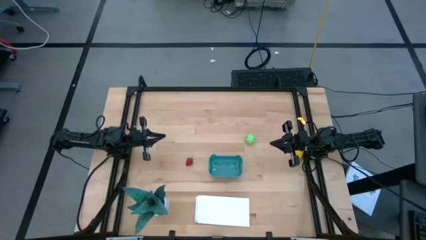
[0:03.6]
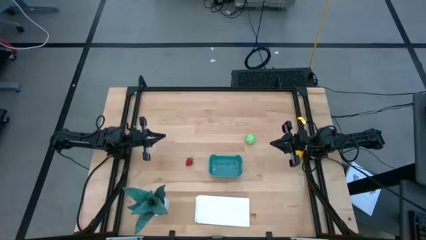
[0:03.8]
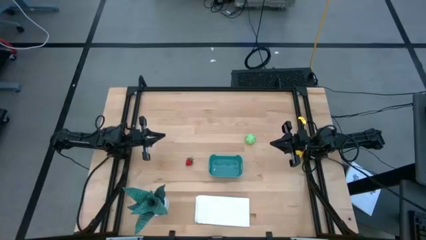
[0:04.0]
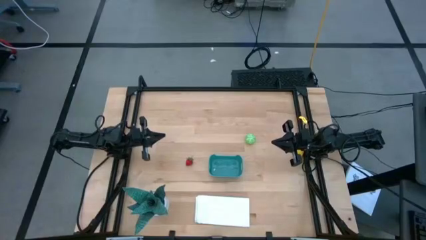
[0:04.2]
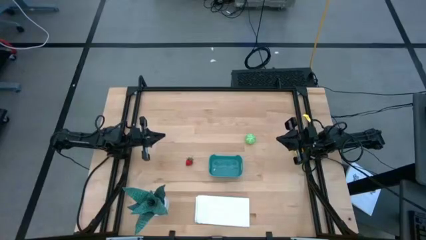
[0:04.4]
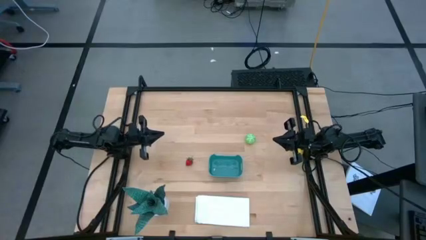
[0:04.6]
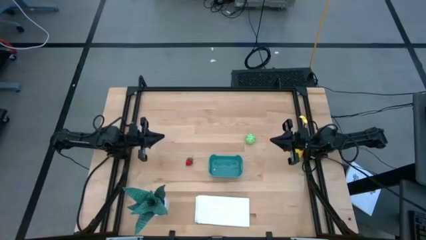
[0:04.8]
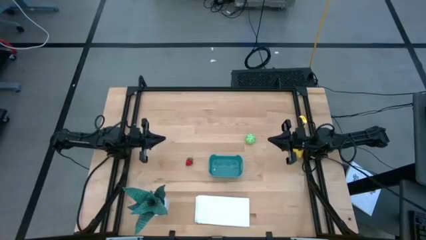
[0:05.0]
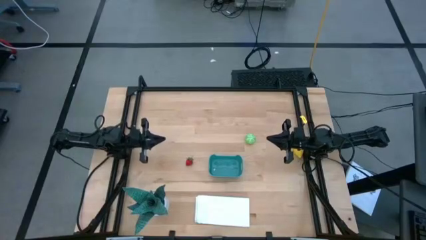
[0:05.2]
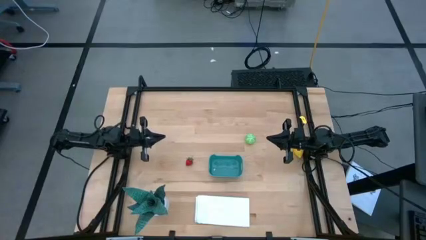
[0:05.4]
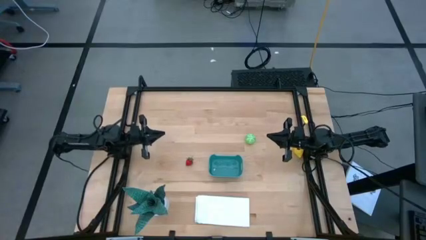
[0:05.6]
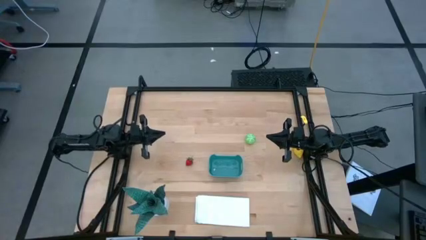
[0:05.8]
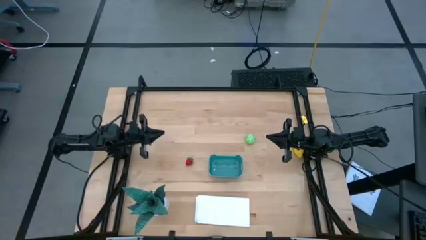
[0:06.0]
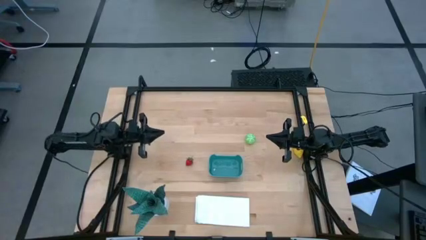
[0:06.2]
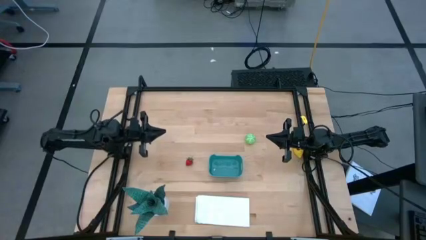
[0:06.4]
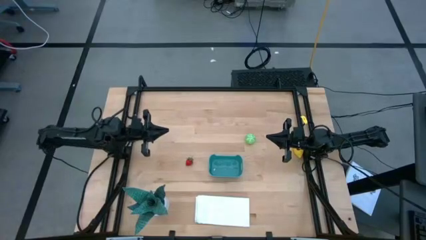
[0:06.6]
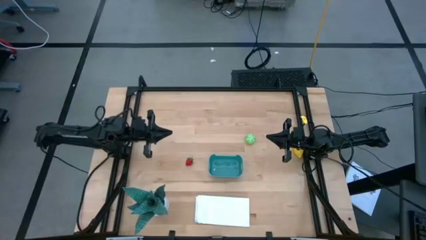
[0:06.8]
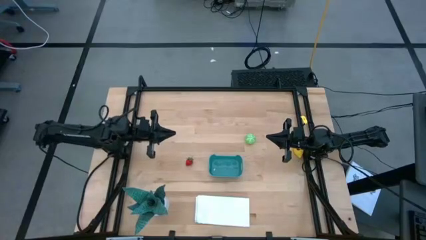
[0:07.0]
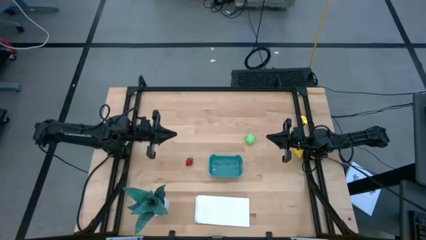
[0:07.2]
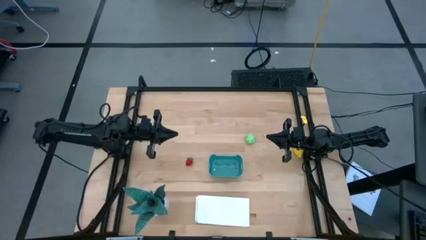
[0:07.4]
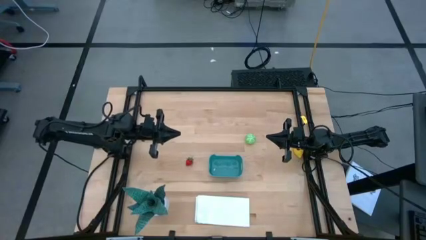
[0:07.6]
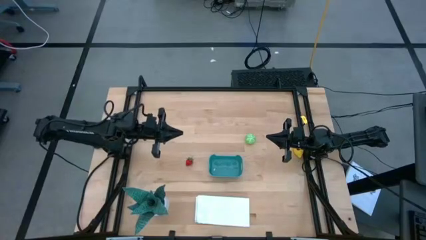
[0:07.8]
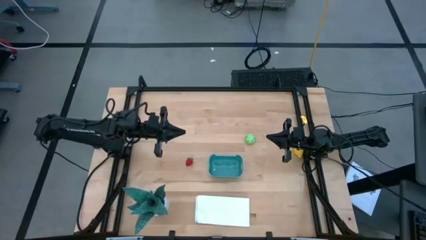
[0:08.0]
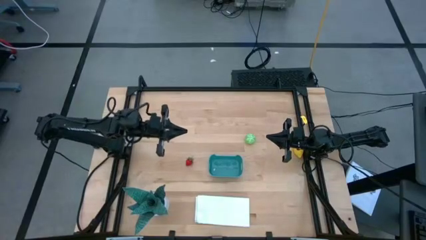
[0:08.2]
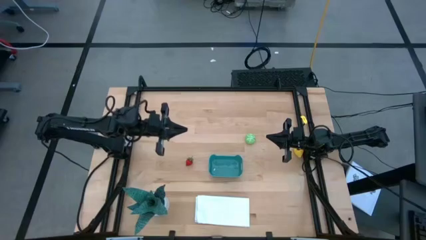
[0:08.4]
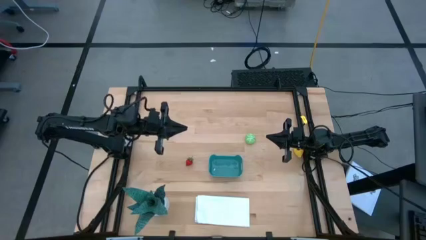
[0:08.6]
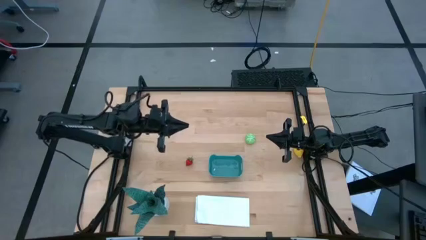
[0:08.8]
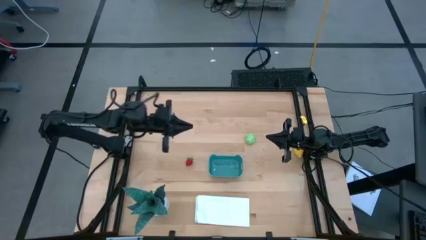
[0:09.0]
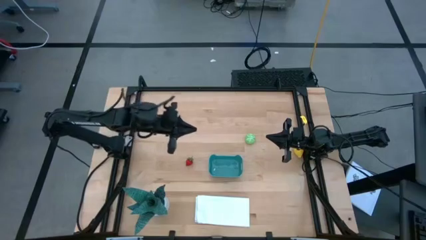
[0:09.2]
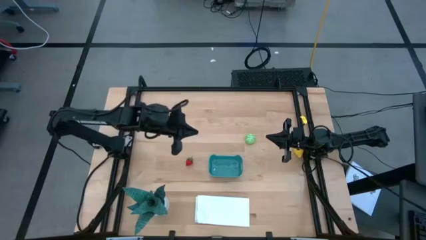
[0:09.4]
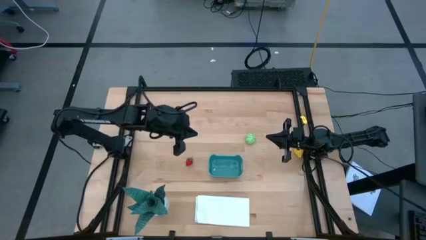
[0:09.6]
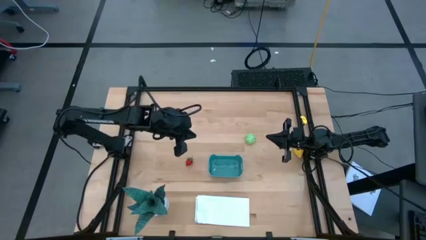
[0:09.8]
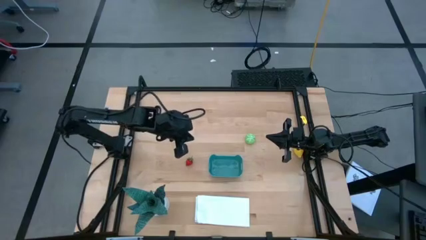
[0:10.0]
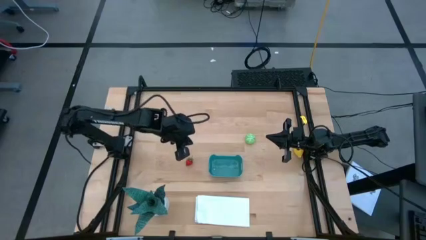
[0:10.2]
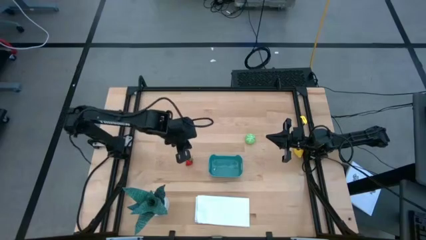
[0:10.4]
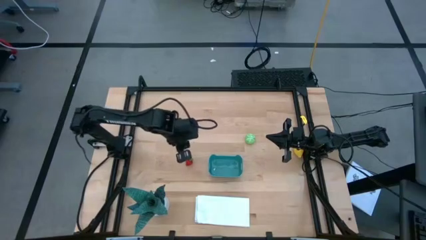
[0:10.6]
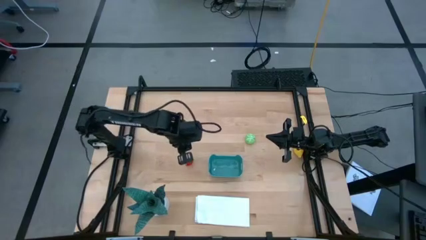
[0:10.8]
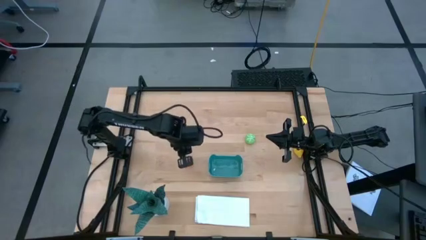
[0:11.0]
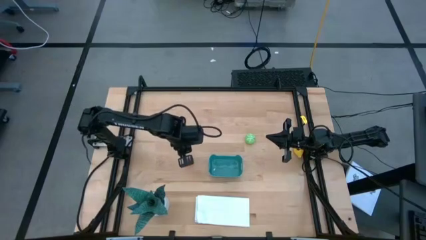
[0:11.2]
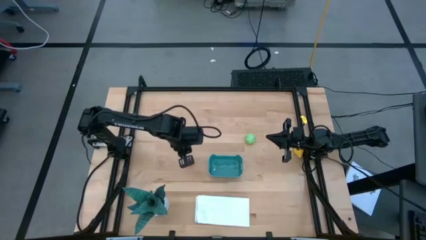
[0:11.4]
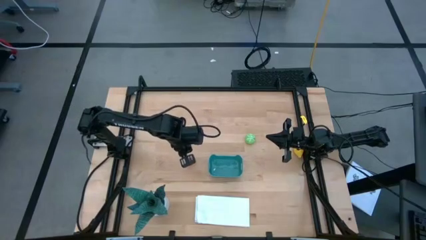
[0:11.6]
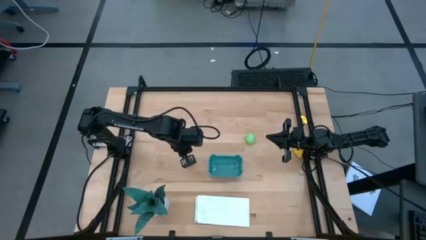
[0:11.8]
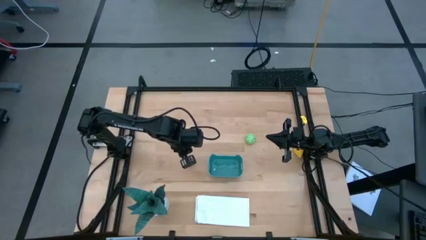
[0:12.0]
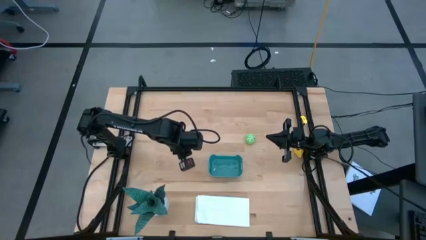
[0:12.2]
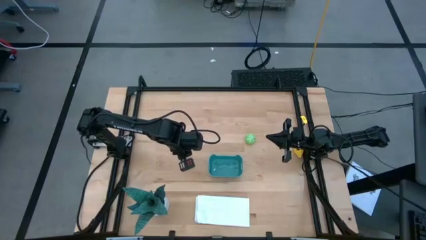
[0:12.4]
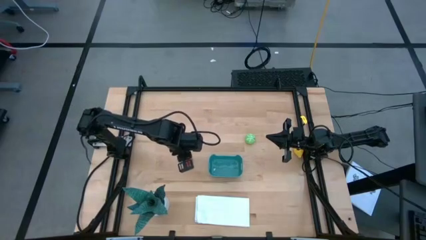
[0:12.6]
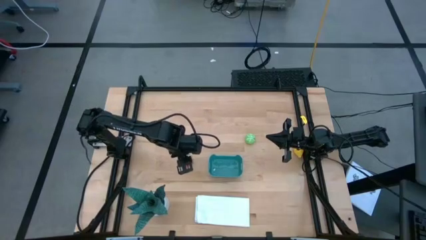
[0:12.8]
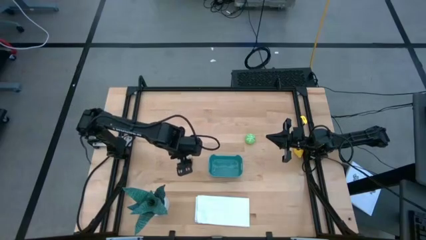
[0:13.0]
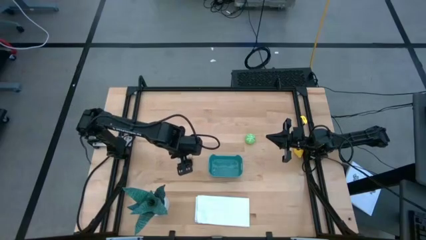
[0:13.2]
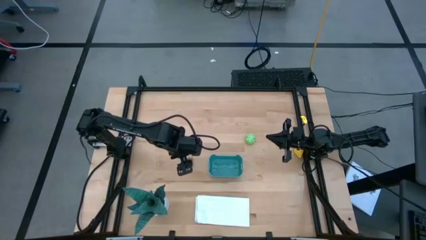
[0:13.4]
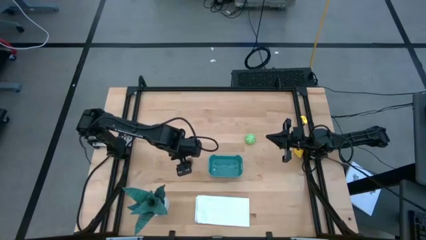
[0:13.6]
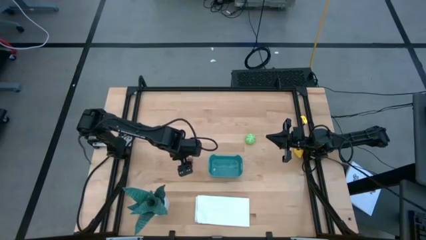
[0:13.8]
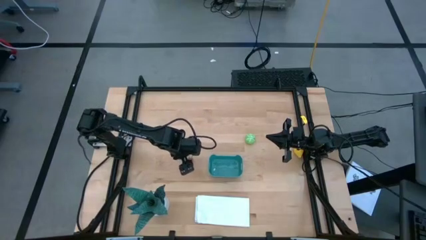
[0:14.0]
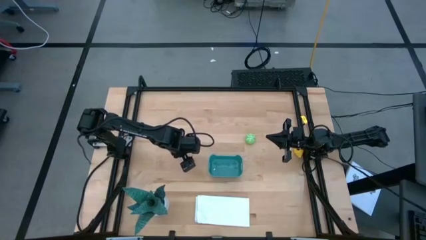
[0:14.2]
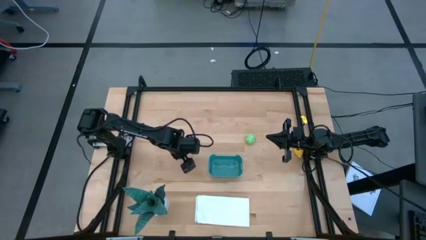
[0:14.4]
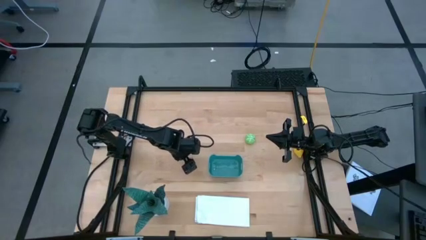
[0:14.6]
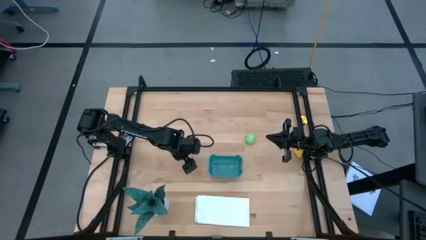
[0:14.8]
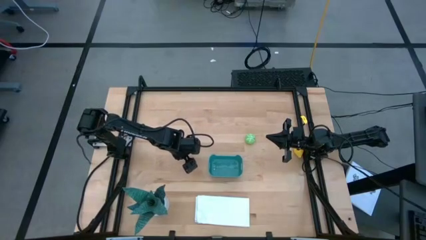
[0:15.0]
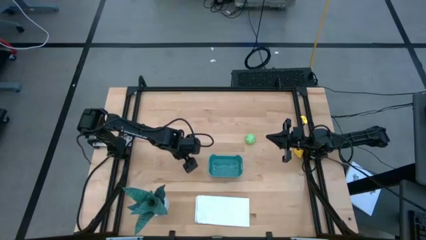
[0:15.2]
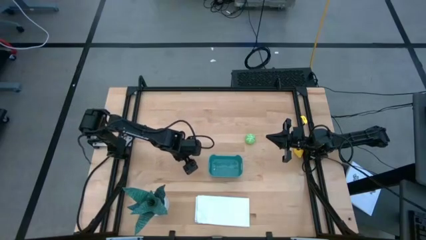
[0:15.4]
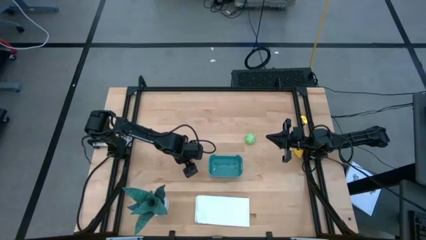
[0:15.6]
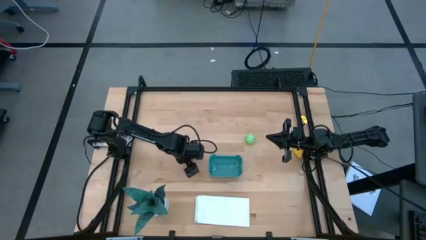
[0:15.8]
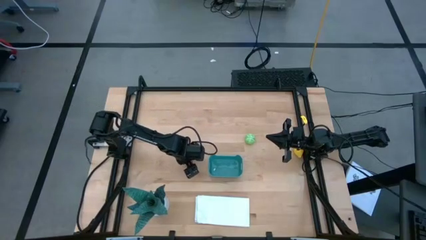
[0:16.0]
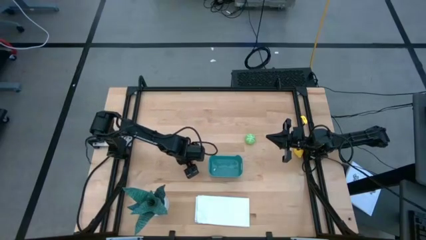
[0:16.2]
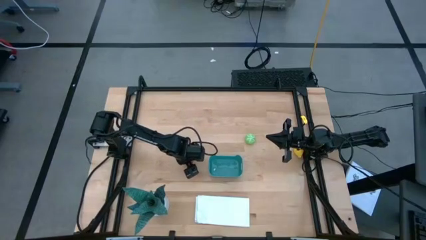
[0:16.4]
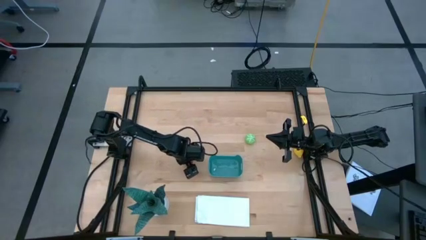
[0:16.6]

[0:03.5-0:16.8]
Task: Pick and placing Produce into tupperware
Put the red strawberry into the blue bin
